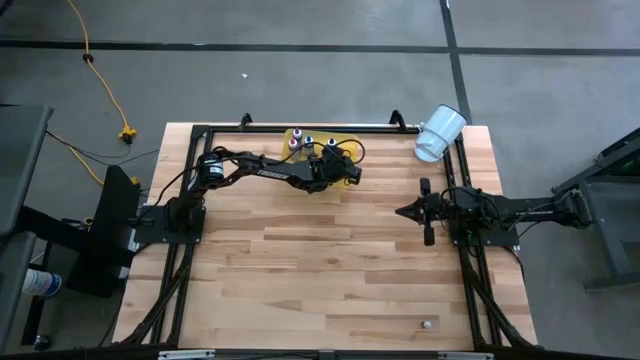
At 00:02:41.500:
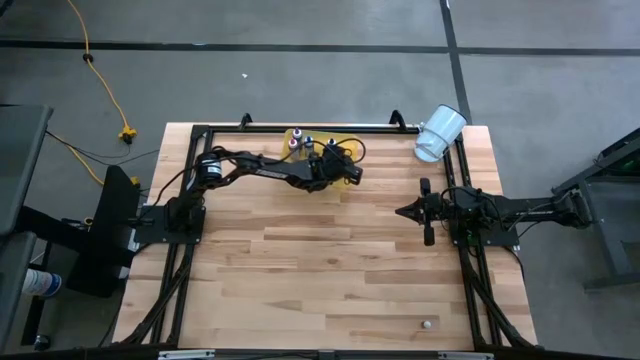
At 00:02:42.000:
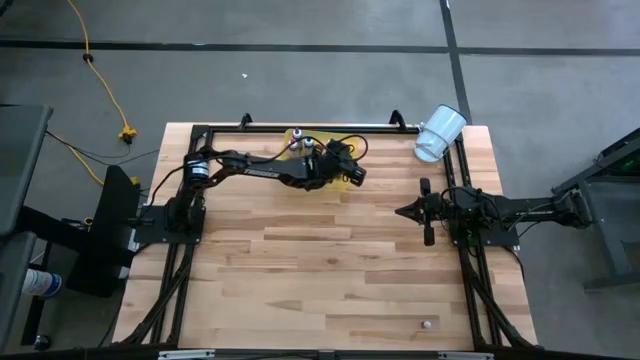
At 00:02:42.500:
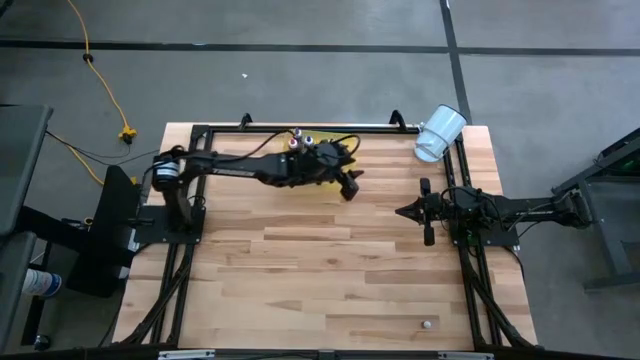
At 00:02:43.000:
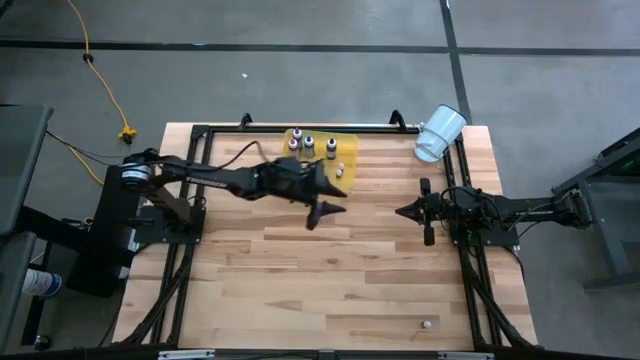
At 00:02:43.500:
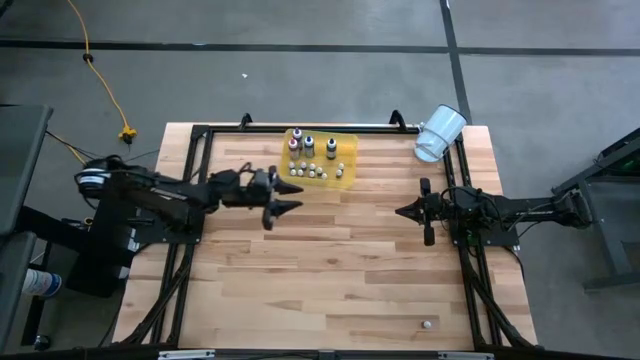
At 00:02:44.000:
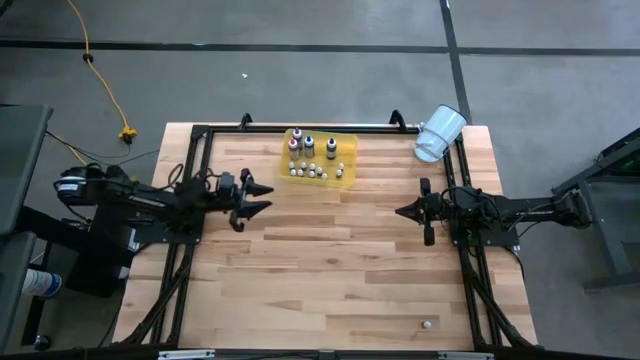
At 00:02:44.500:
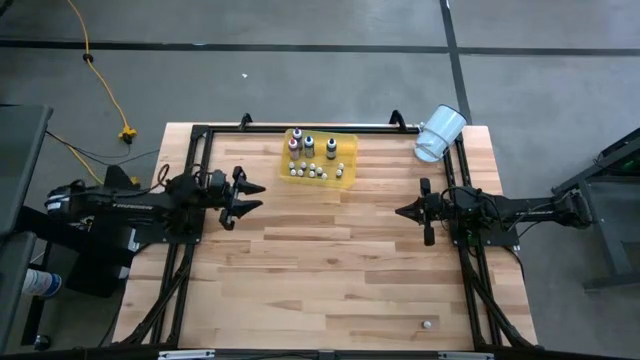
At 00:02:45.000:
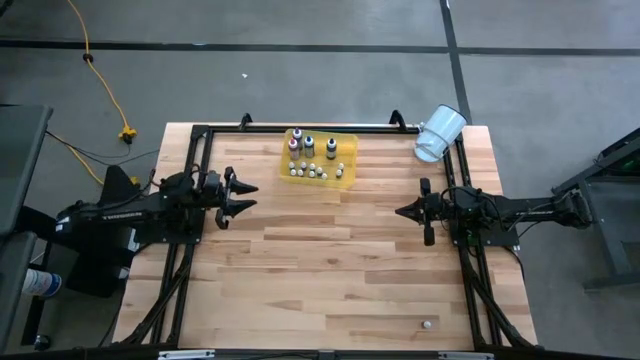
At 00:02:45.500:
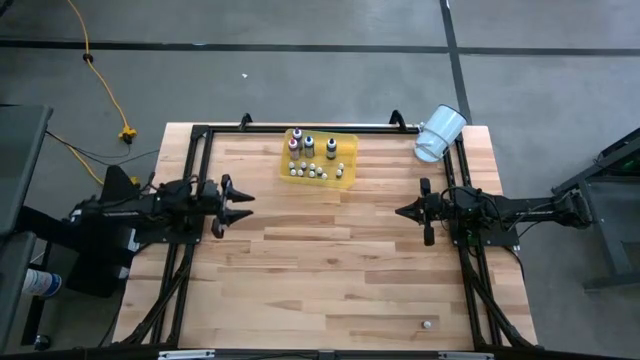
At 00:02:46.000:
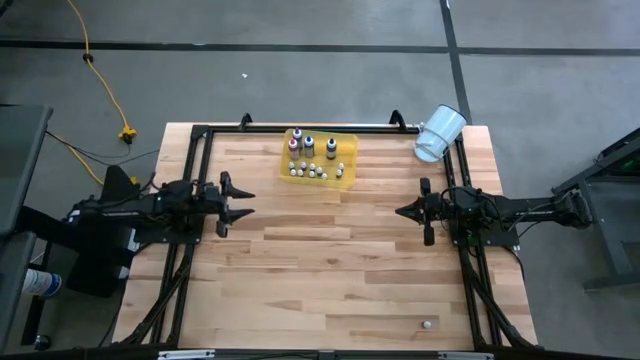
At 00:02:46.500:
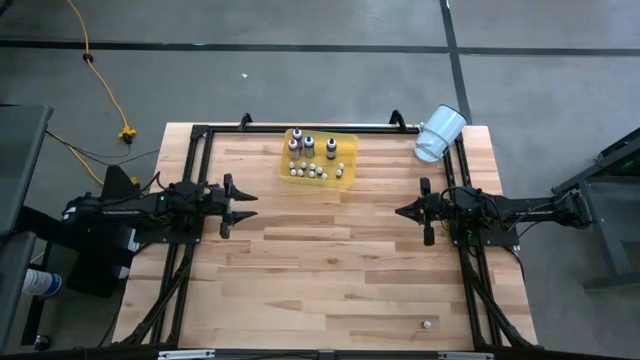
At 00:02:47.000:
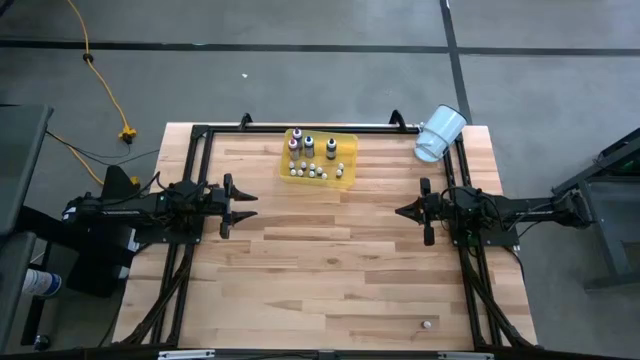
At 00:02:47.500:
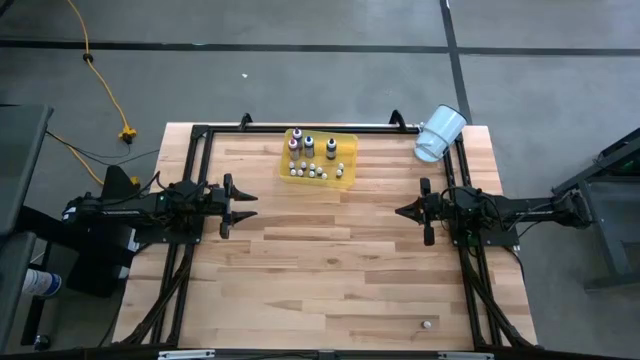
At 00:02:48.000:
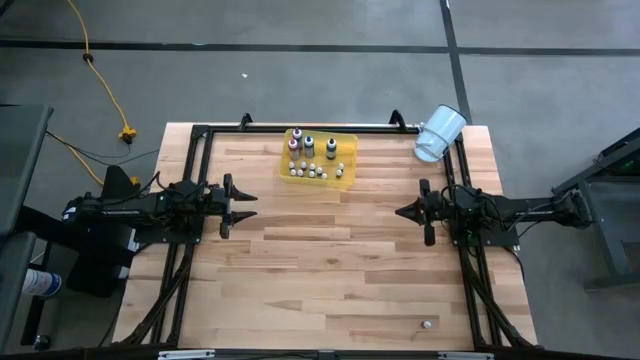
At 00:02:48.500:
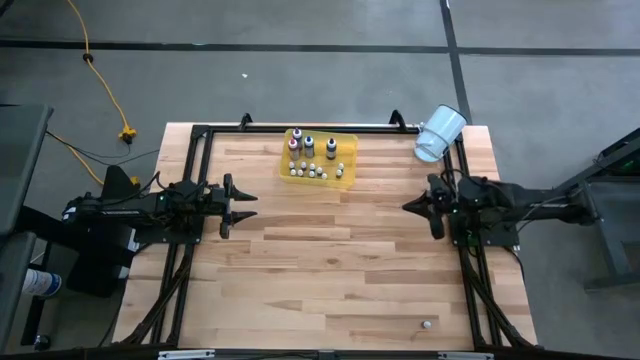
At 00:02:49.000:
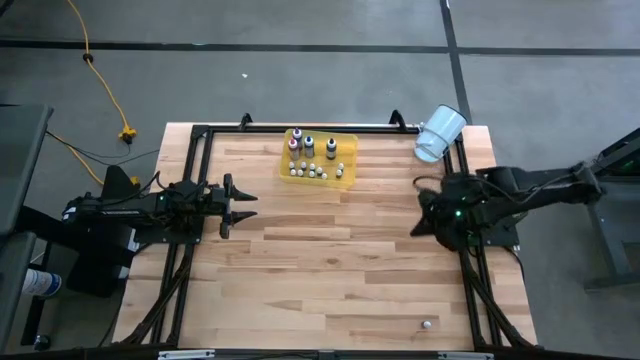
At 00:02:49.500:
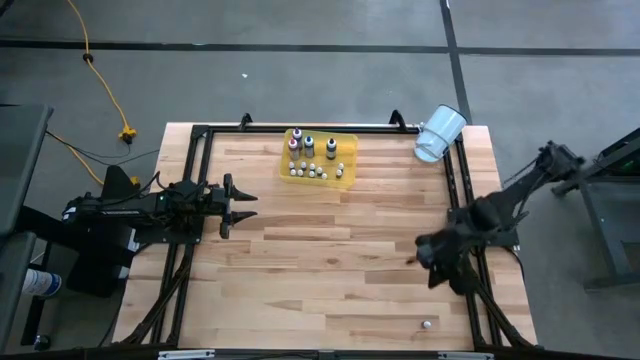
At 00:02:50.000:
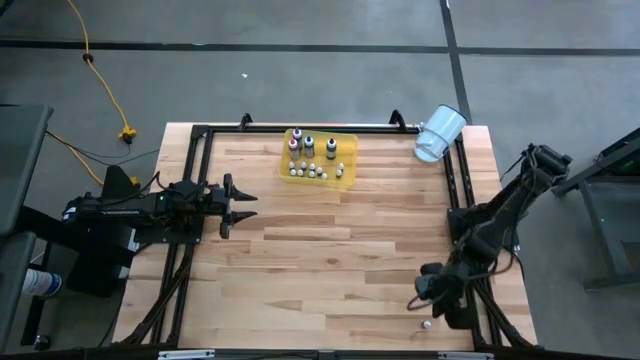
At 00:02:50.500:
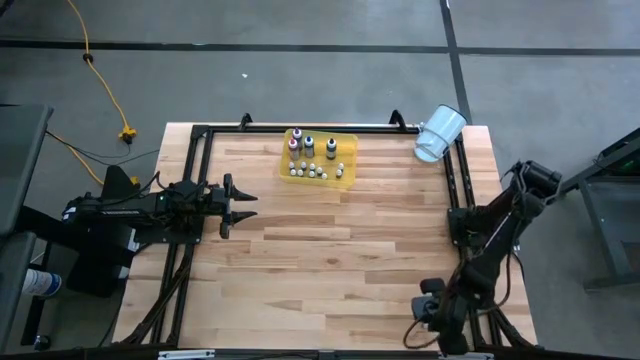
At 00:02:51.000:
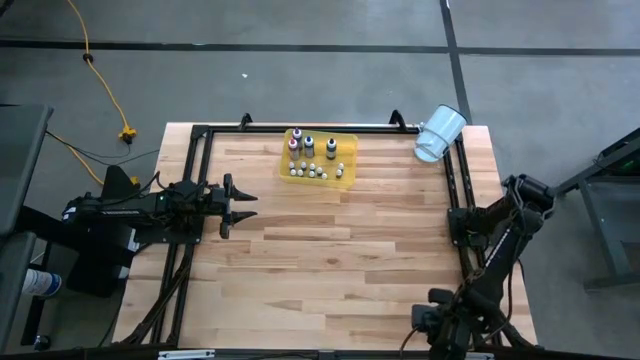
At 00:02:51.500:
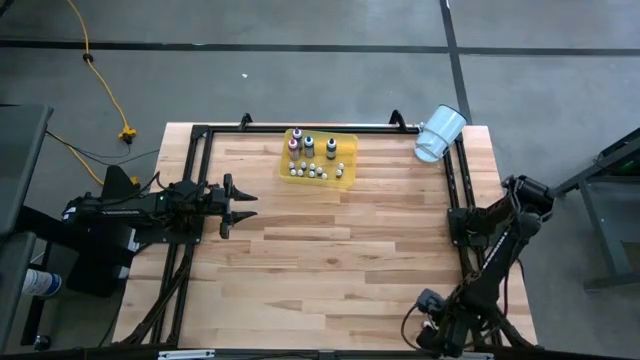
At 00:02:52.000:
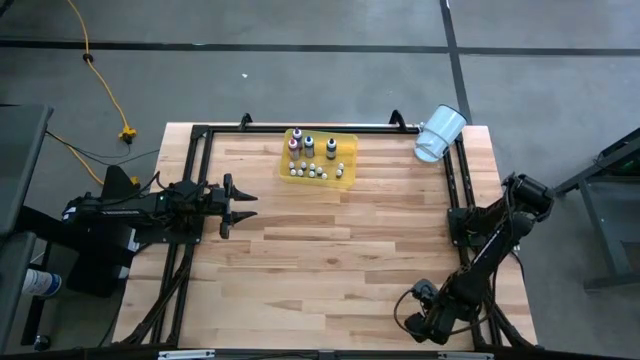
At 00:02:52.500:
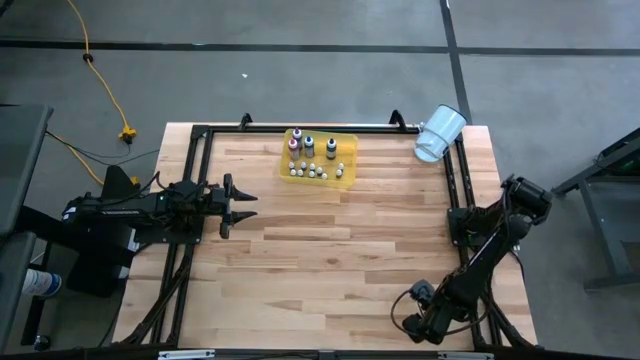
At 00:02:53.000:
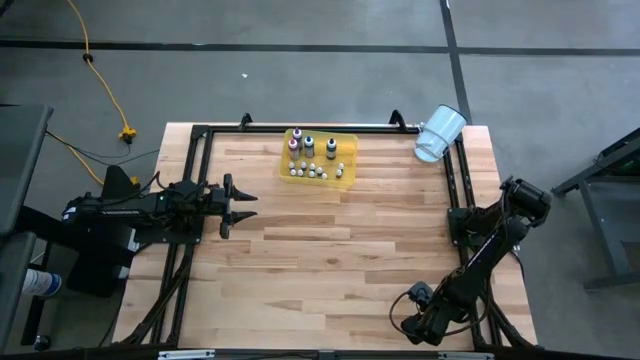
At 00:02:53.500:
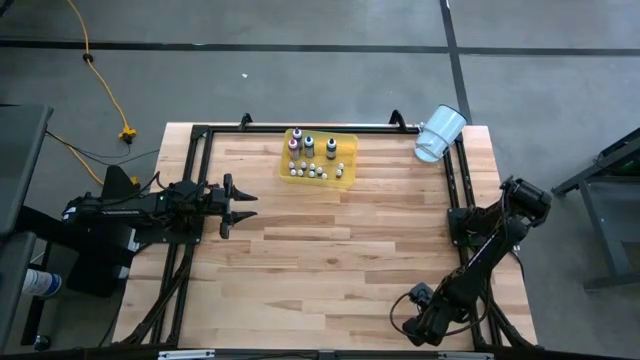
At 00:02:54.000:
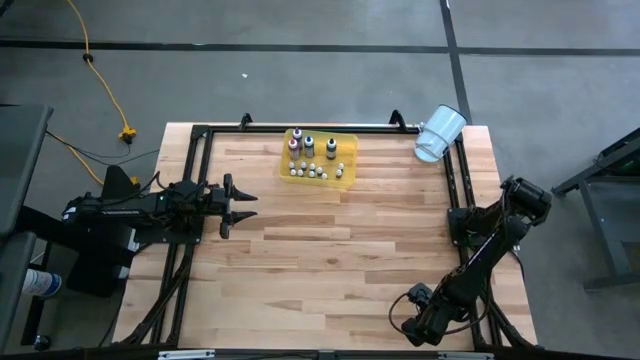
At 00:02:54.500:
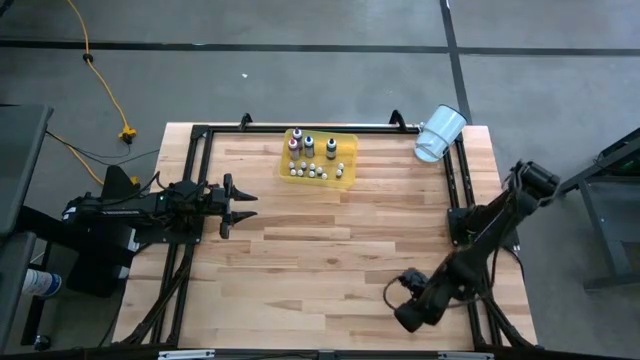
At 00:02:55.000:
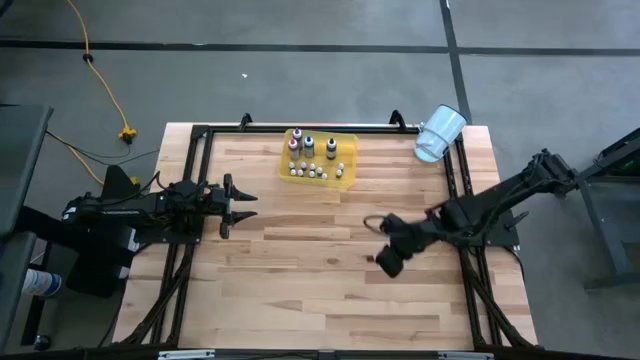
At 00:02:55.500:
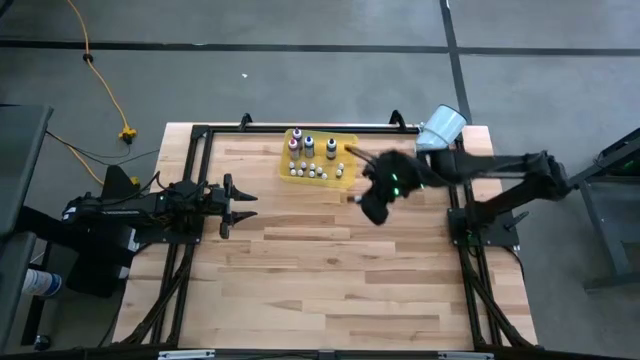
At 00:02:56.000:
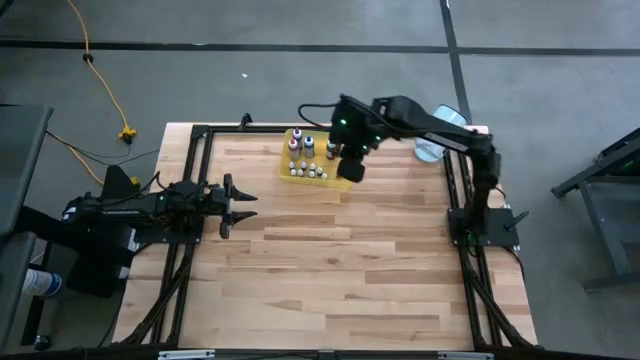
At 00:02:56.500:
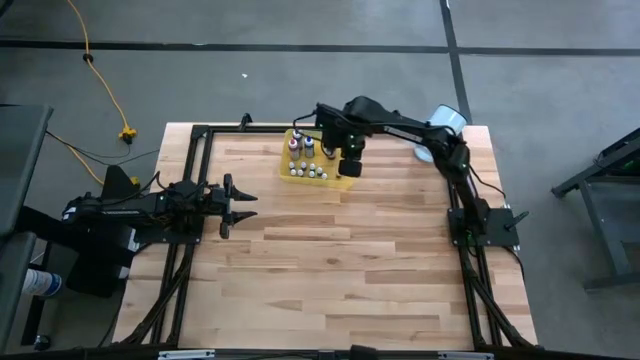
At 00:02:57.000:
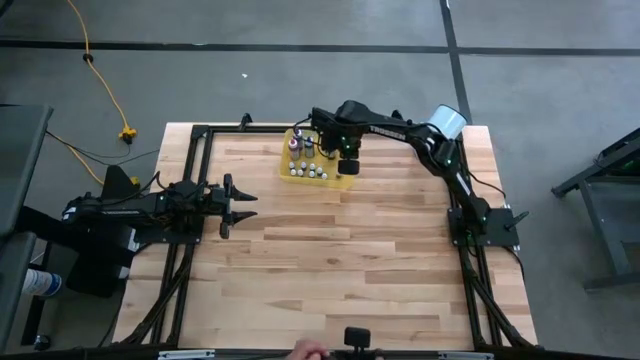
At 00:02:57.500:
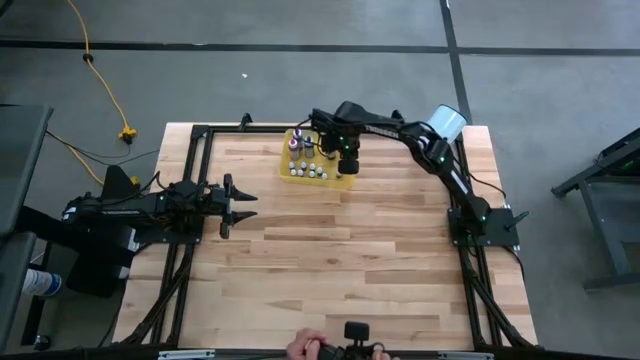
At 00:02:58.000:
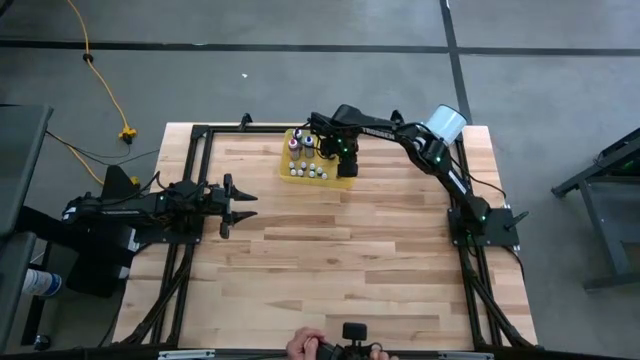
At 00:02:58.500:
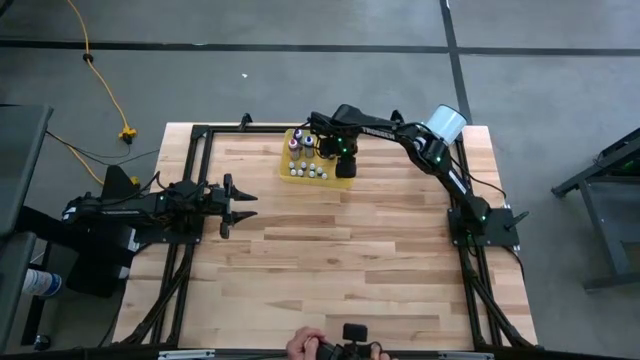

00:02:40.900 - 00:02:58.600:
Task: Pick & Place food coloring
Put the small red food coloring into the yellow container

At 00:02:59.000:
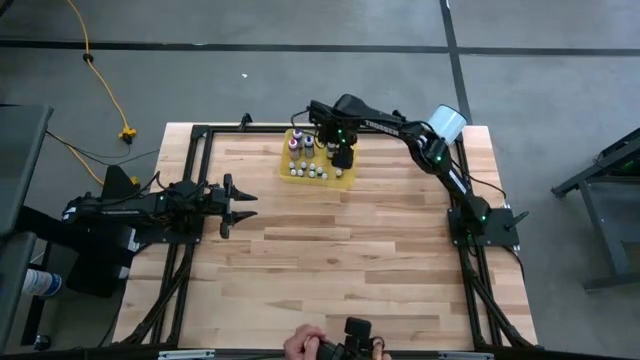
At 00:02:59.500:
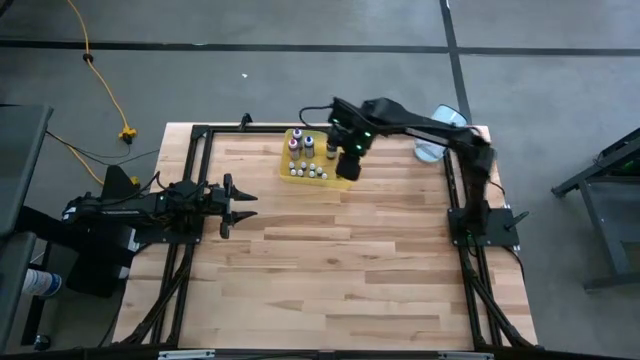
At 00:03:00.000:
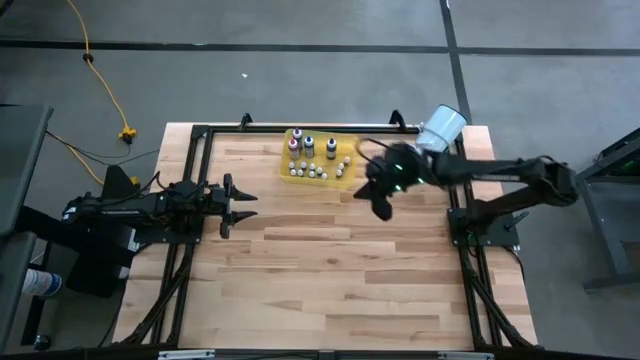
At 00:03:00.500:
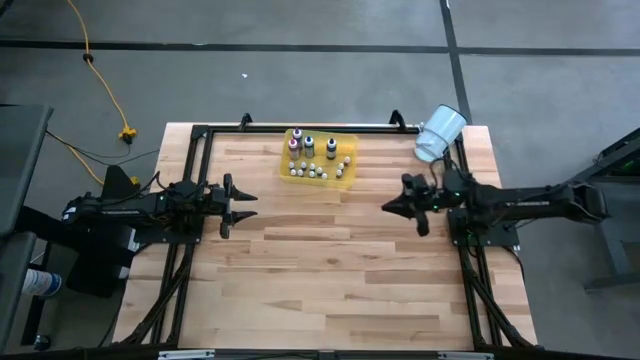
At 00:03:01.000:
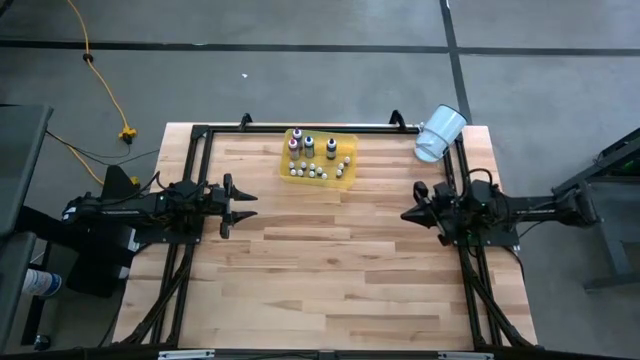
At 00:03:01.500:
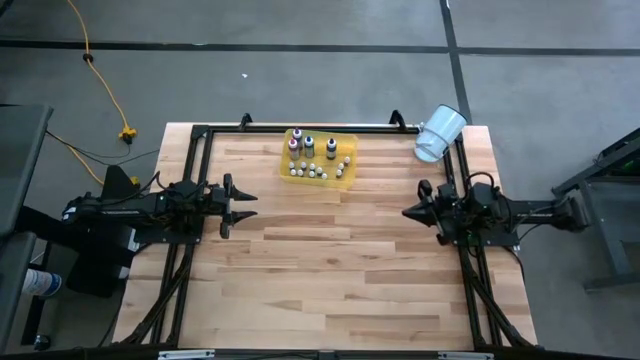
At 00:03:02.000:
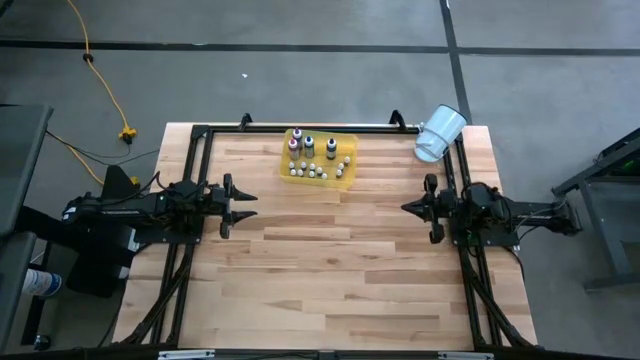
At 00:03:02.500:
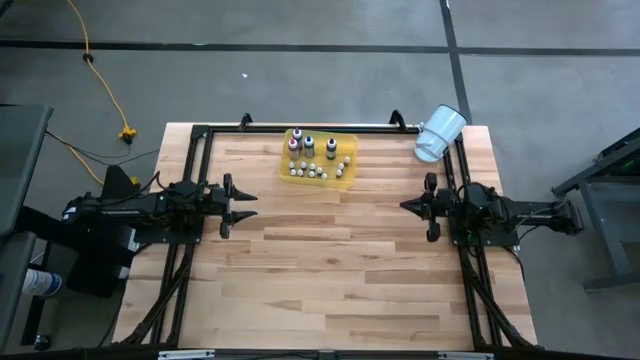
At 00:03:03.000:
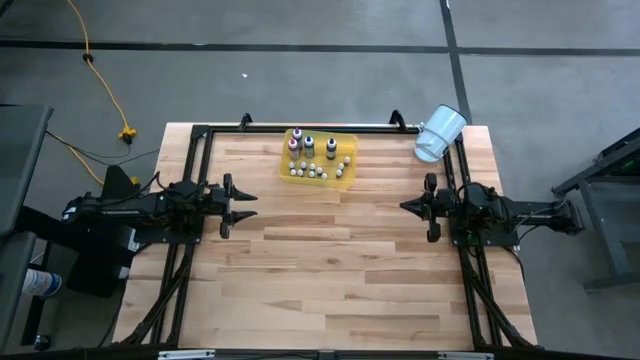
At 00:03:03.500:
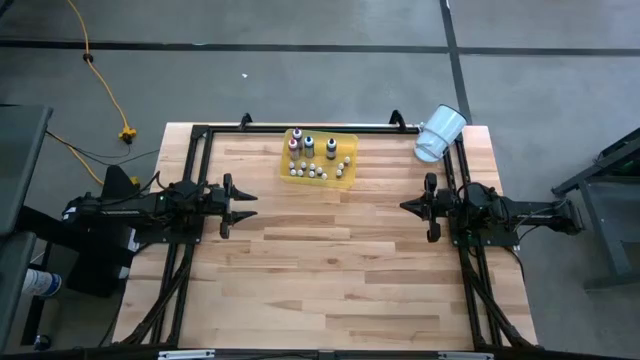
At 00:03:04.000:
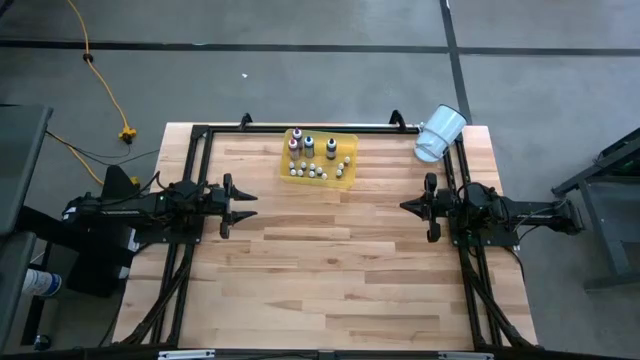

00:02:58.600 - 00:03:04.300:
Return to Home Position
